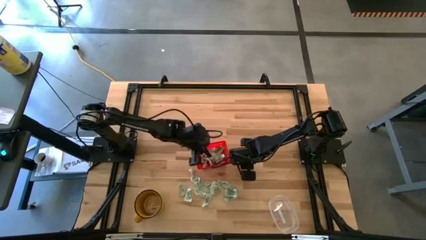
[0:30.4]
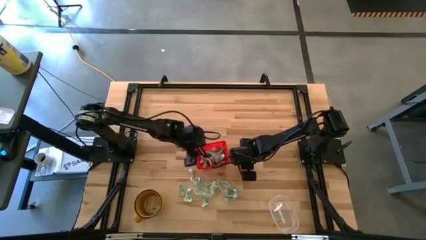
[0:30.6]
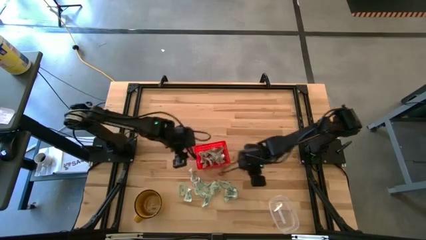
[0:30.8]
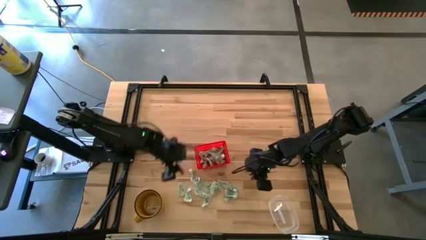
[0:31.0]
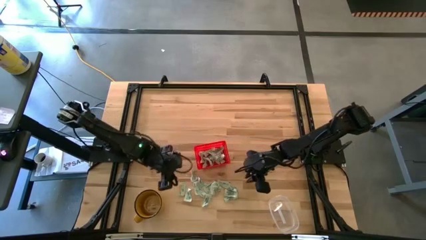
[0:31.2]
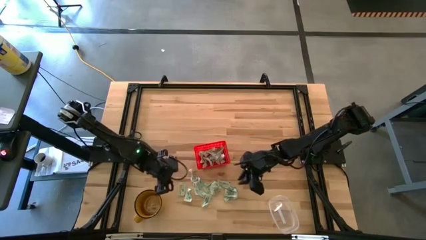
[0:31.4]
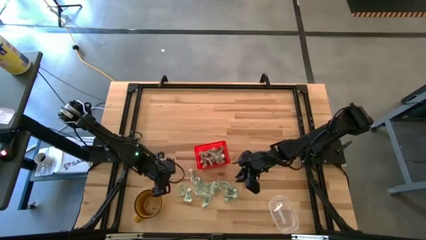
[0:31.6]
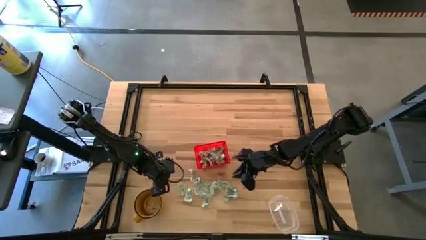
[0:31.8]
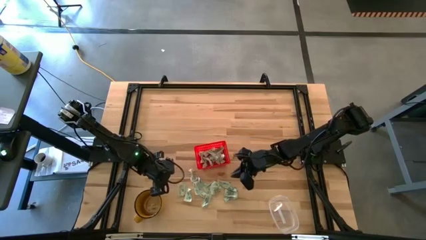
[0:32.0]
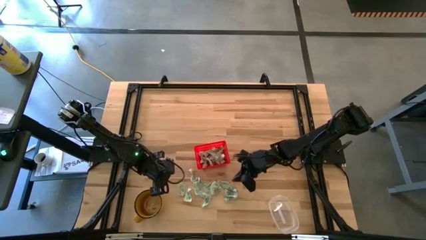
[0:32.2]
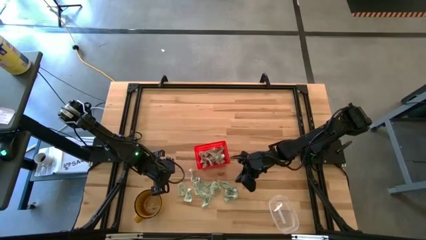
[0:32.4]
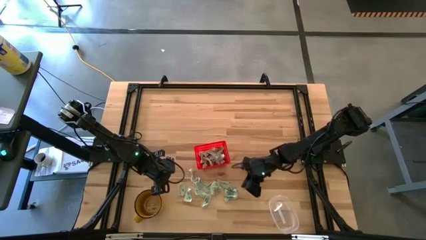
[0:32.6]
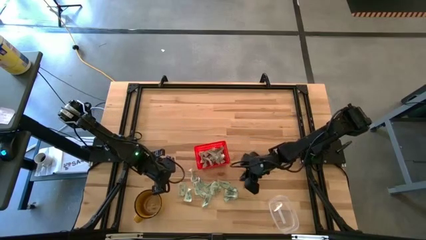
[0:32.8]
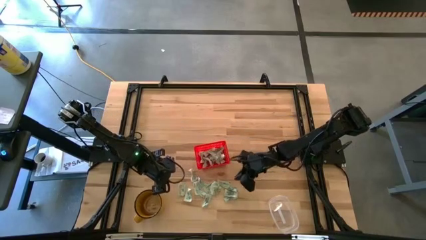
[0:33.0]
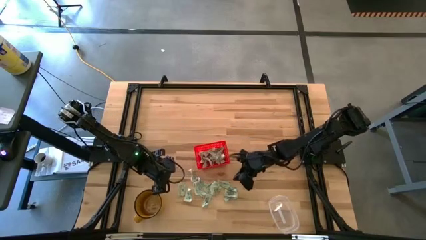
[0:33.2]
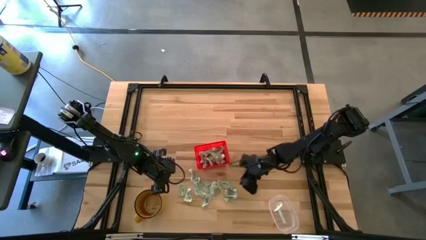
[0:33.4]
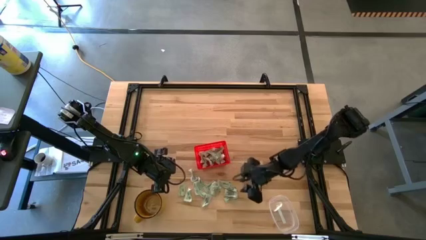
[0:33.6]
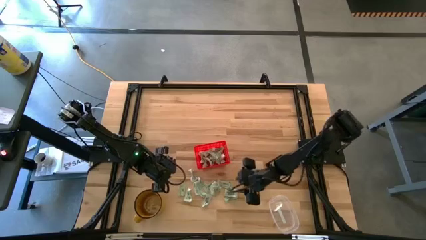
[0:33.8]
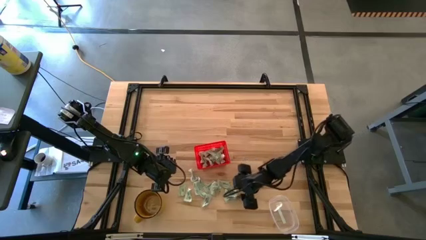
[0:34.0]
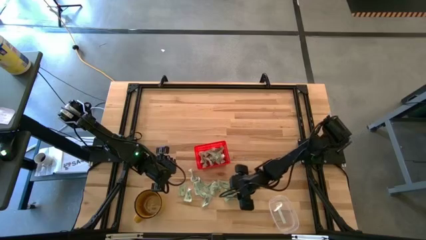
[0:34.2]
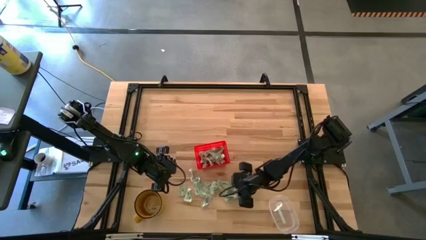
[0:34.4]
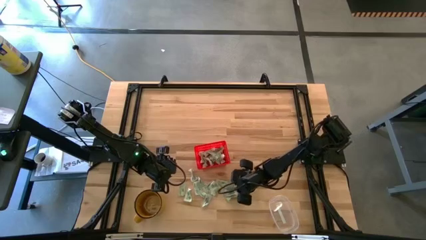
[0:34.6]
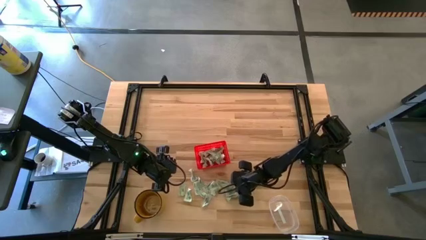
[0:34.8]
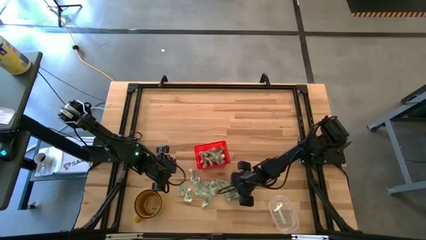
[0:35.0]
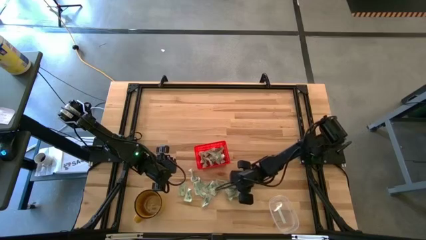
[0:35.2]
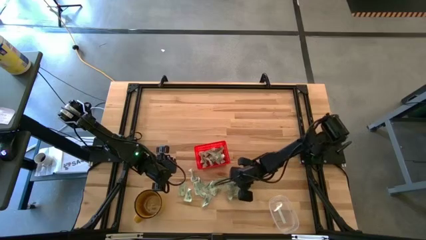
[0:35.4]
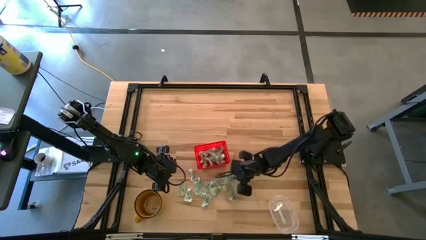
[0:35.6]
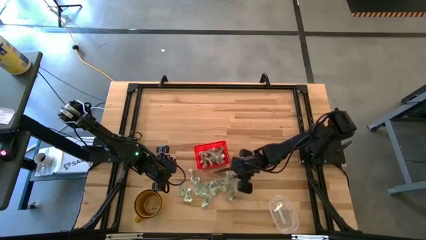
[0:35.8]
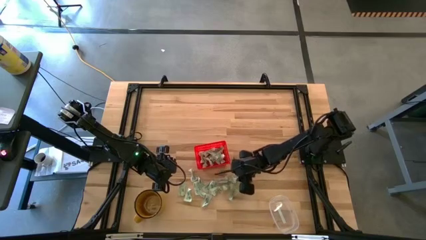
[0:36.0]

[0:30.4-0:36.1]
Task: Pick and place Stevia / Truvia into bins
Put the stevia packet into the orange basket

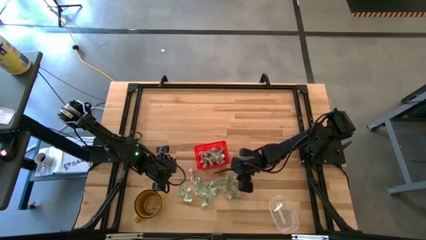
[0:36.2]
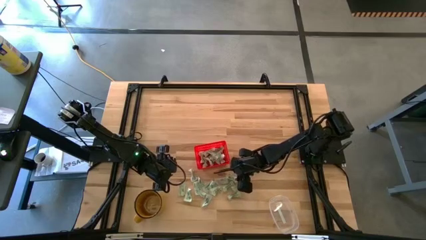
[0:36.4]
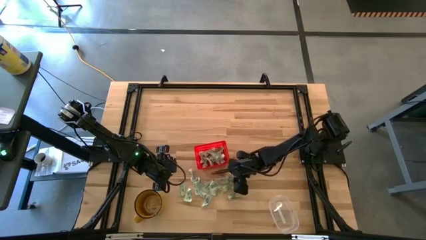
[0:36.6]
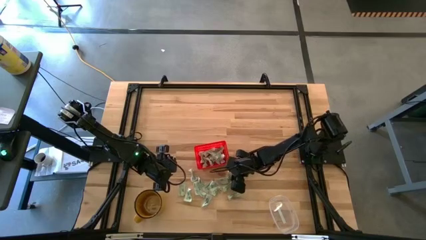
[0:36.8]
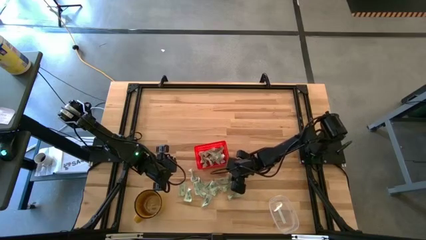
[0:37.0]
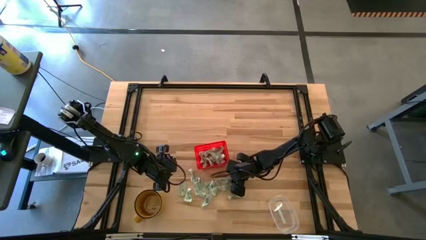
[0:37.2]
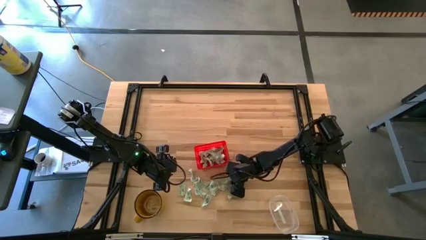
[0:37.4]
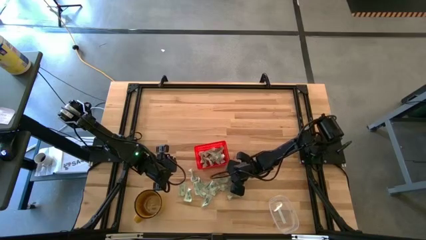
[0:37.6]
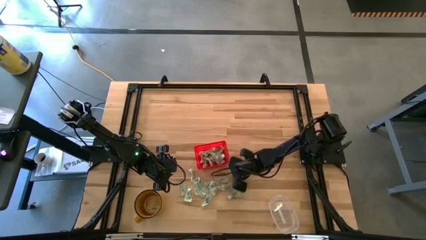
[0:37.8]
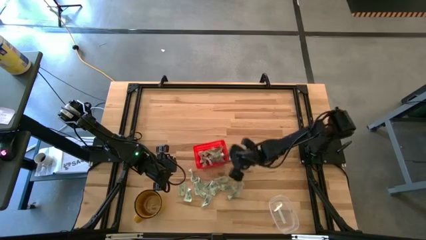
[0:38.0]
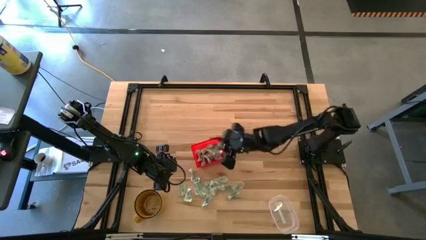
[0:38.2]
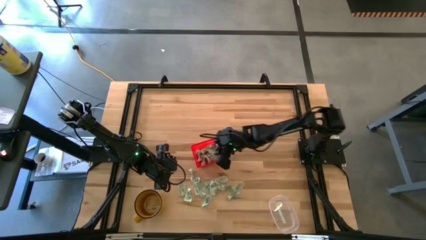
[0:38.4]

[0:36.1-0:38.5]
Put the stevia packet into the orange basket

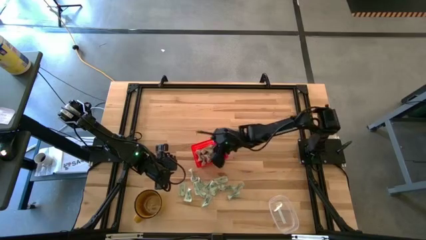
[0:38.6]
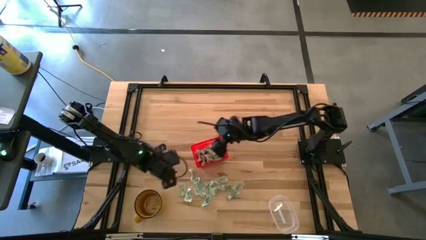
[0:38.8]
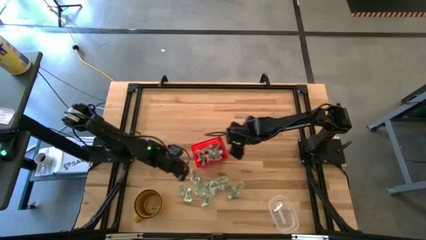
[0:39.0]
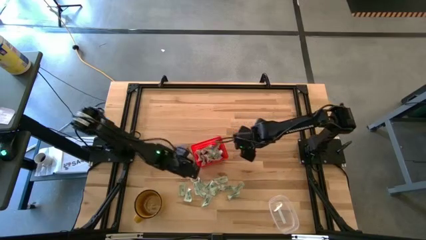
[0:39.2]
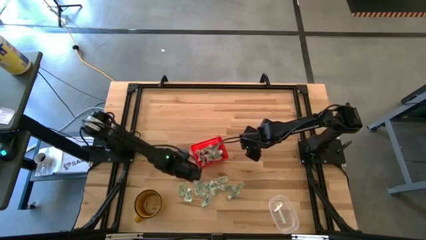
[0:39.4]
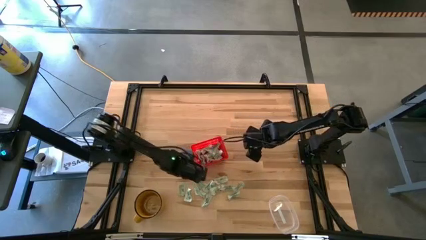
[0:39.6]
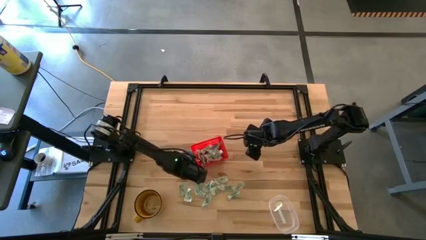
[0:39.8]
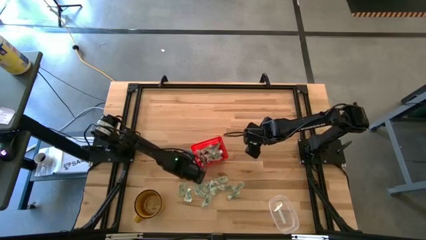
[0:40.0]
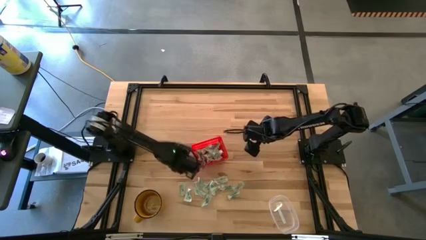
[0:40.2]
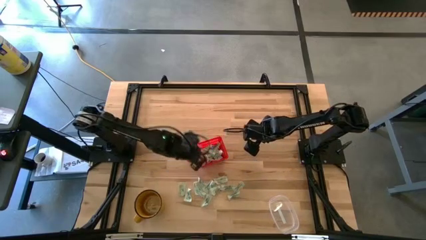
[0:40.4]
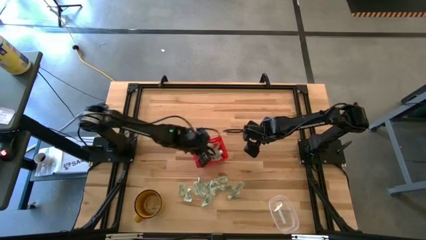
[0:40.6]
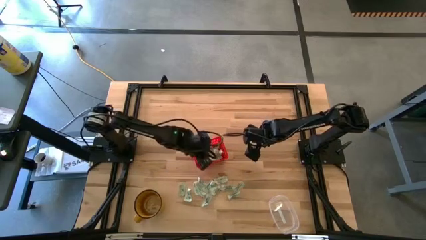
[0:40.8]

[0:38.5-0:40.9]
Put the stevia packet into the orange basket

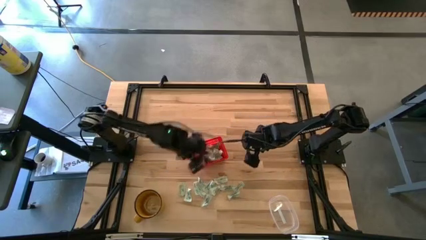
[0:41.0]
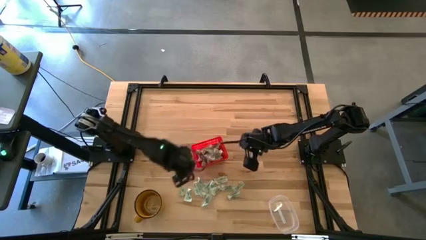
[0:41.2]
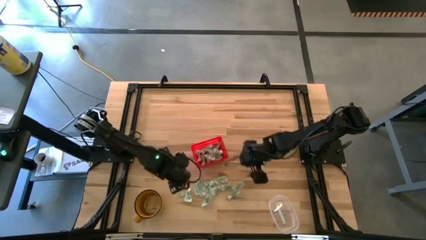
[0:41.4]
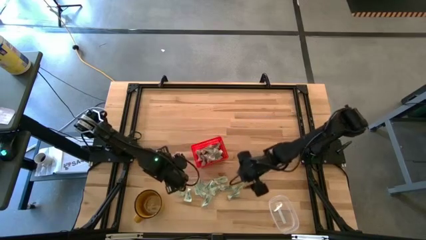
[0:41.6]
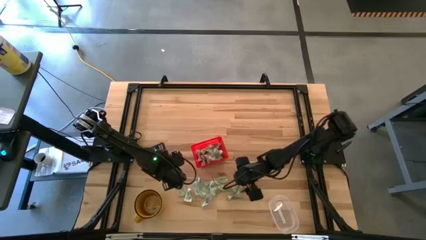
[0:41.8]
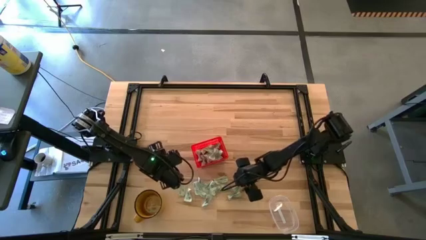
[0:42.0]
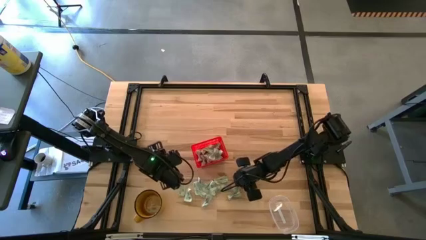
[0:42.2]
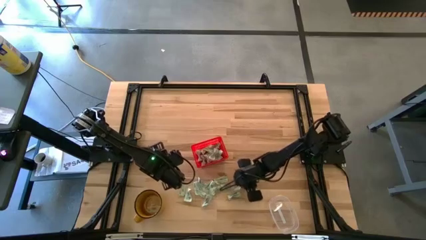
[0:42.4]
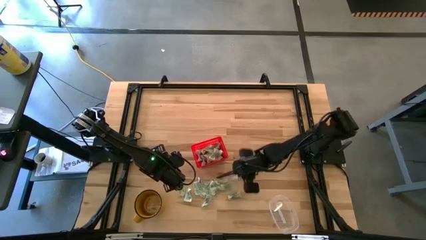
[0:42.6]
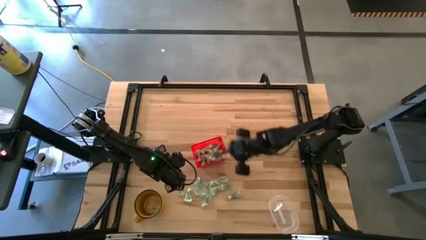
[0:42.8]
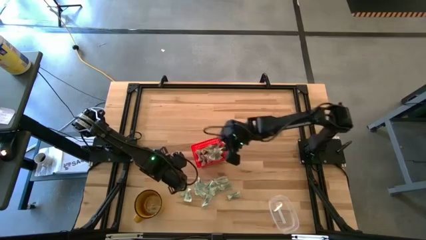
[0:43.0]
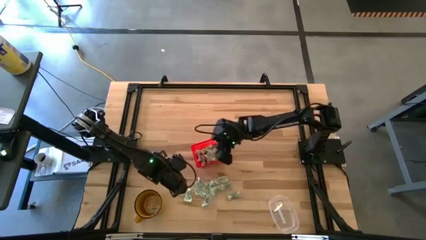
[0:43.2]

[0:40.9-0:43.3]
Put the stevia packet into the orange basket

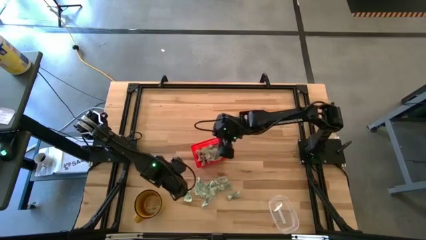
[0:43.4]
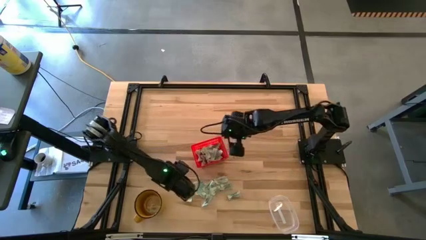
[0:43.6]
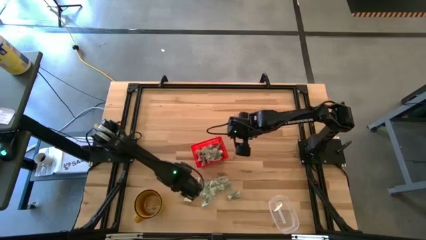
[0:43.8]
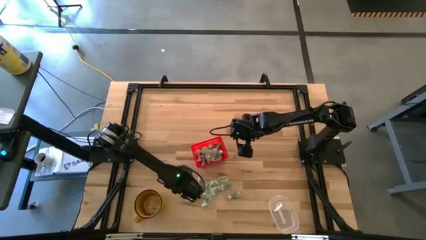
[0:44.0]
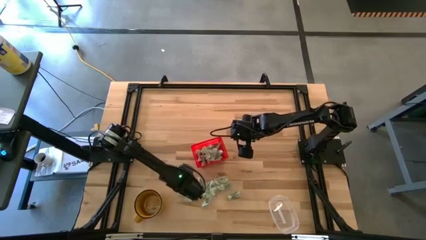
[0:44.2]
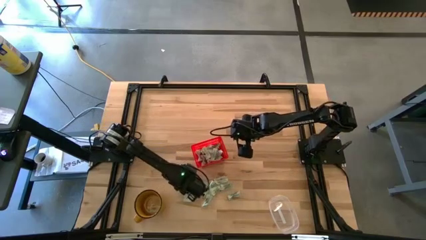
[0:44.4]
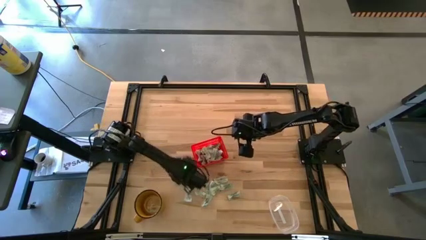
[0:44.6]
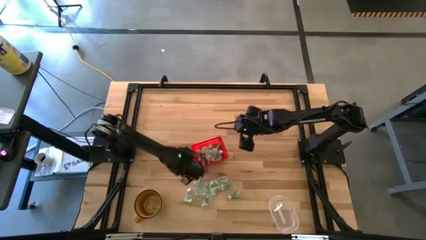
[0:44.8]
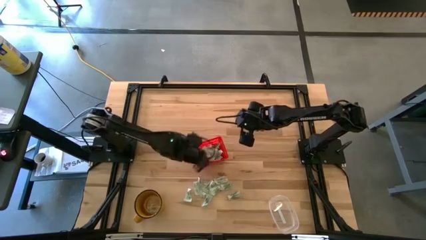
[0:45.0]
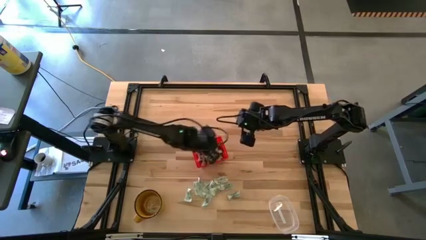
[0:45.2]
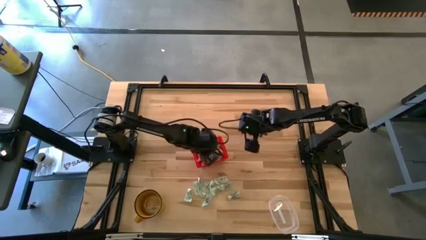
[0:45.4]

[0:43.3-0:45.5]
Put the stevia packet into the orange basket

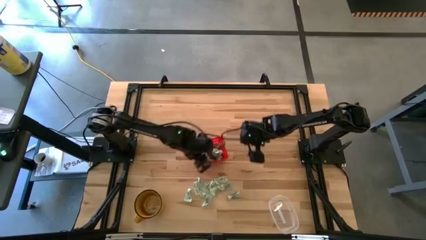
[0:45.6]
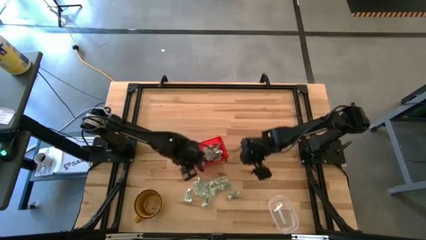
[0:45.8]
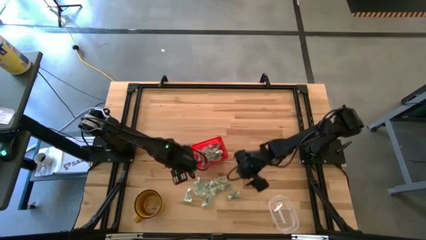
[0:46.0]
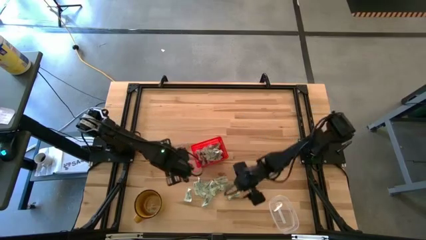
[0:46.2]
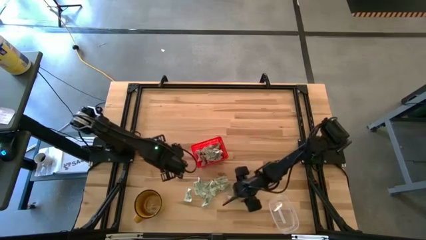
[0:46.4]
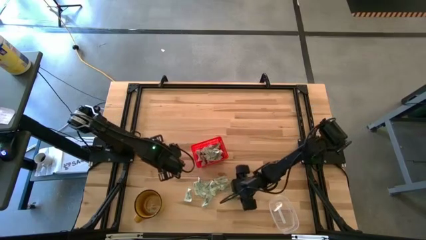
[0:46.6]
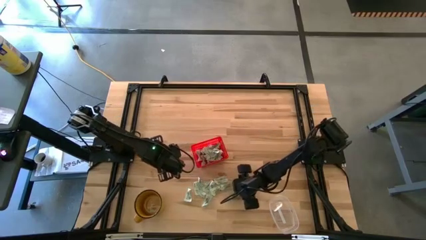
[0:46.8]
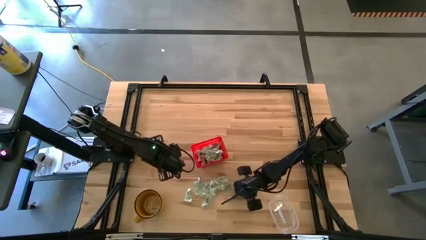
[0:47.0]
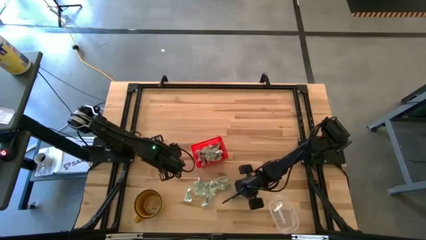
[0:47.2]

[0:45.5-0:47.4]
Put the stevia packet into the orange basket

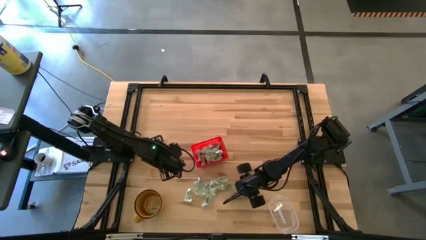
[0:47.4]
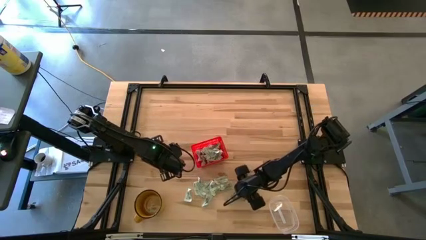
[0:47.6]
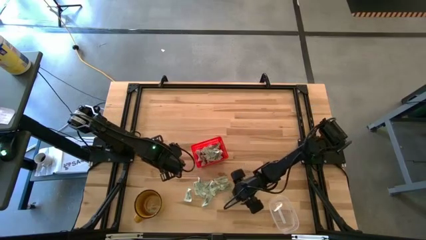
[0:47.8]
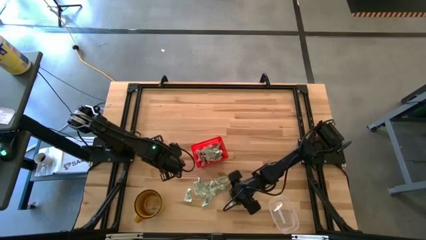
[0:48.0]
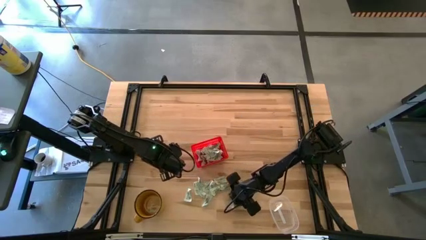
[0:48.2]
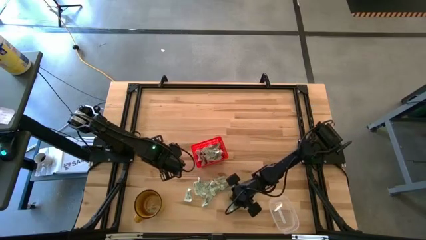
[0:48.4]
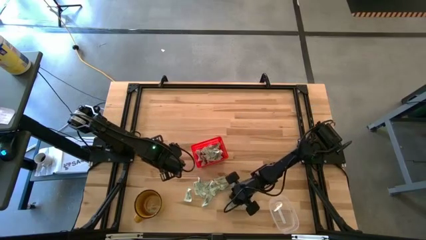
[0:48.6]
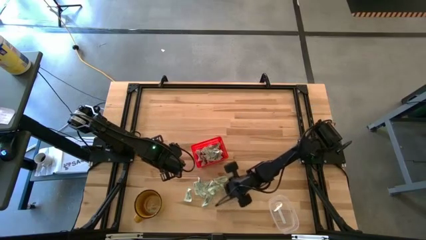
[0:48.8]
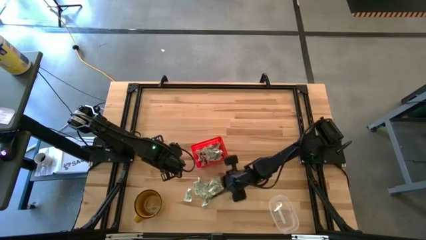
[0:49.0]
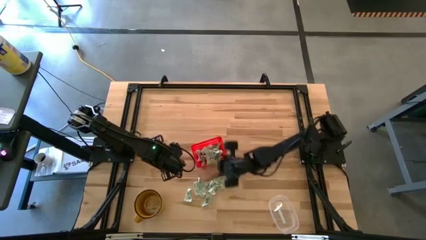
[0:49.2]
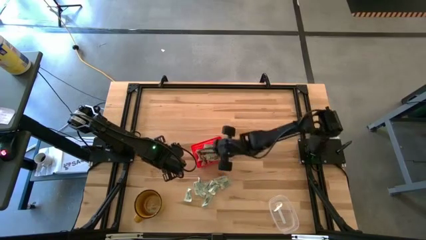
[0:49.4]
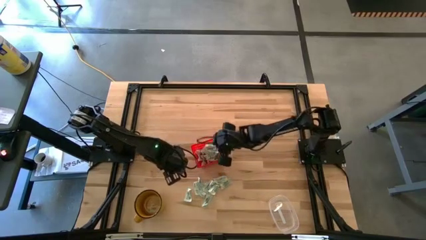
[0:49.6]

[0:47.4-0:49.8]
Put the stevia packet into the orange basket
